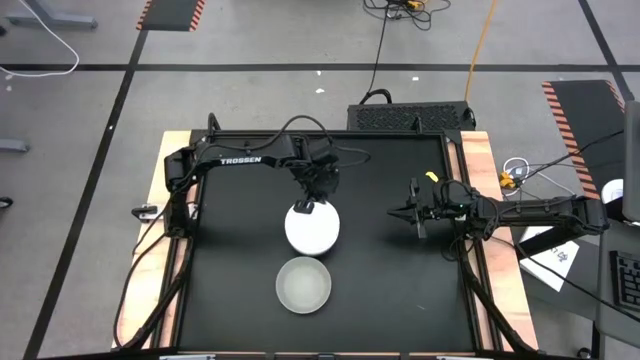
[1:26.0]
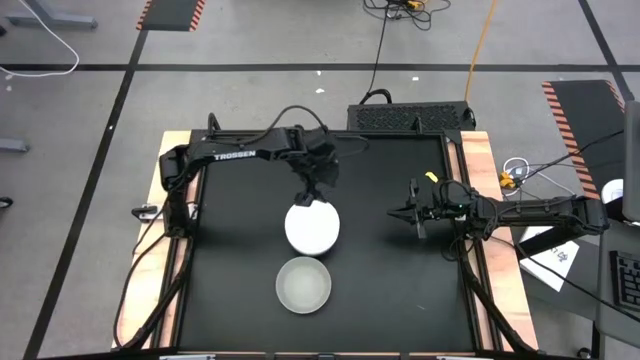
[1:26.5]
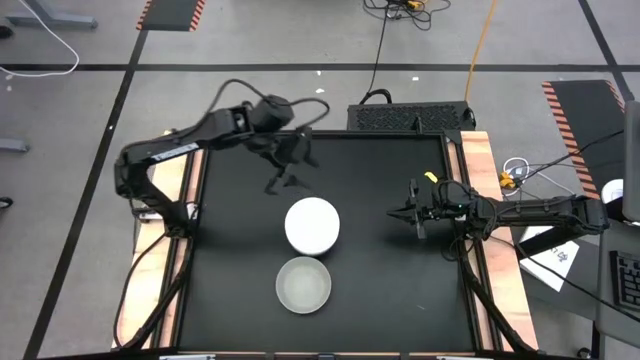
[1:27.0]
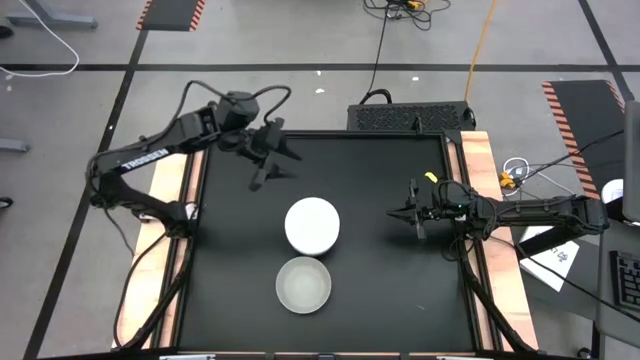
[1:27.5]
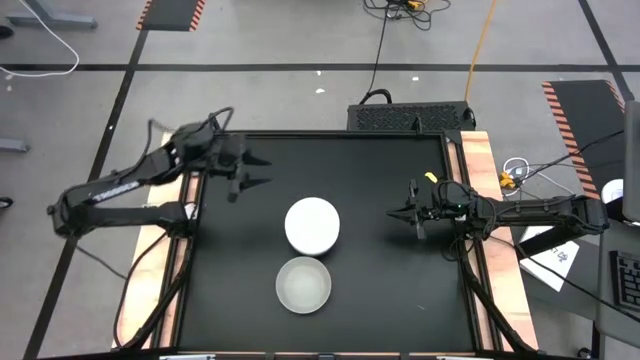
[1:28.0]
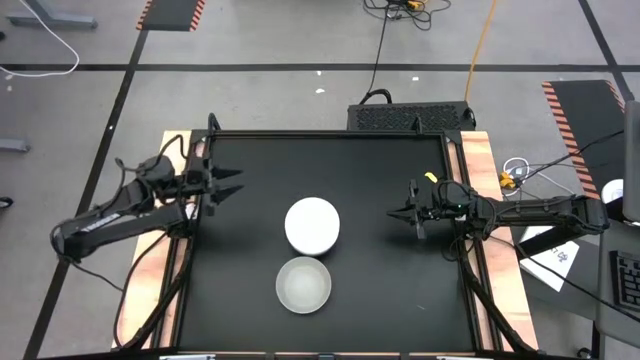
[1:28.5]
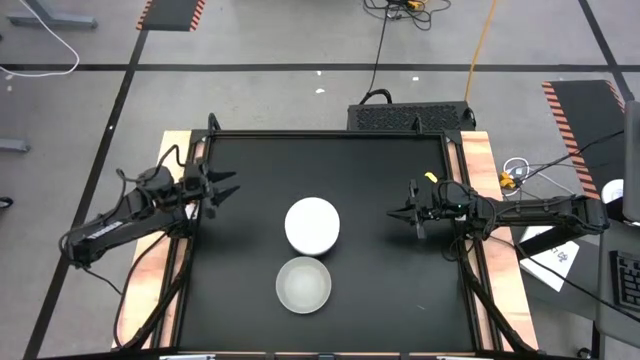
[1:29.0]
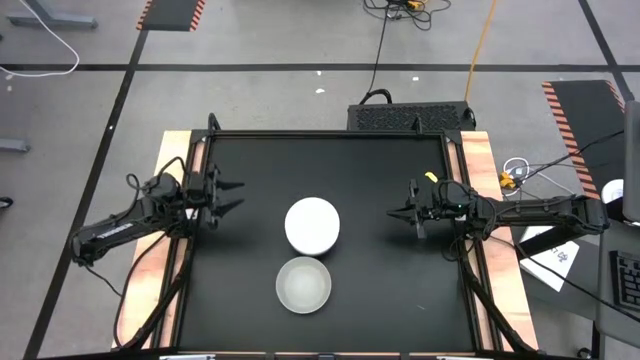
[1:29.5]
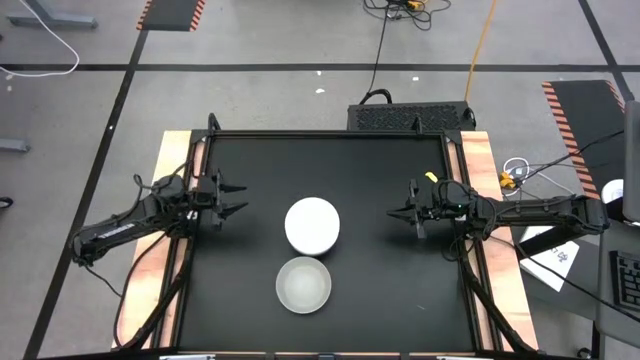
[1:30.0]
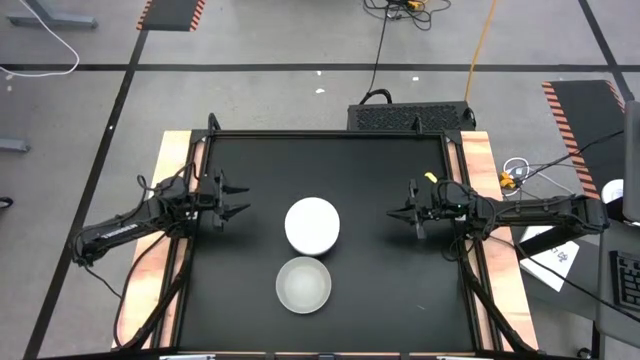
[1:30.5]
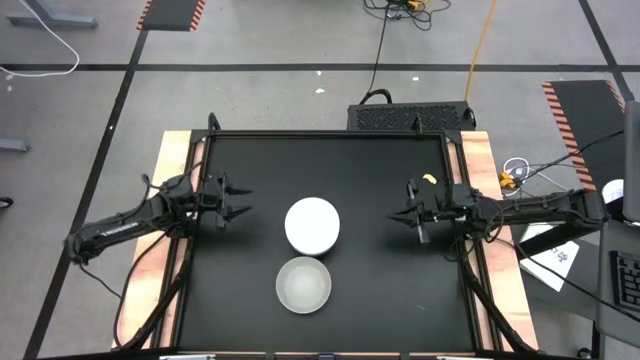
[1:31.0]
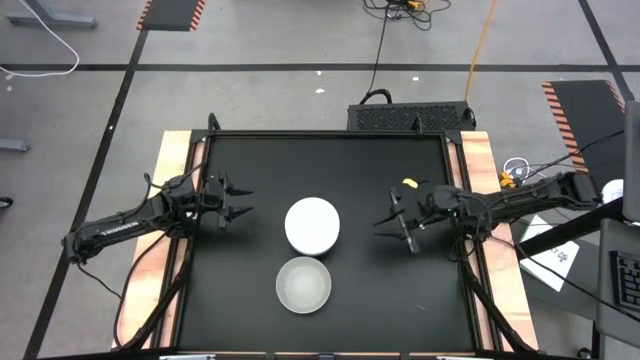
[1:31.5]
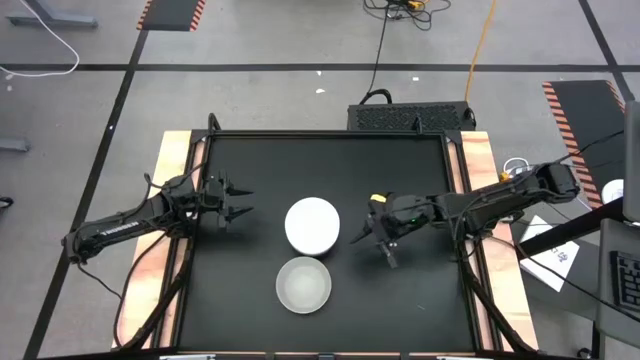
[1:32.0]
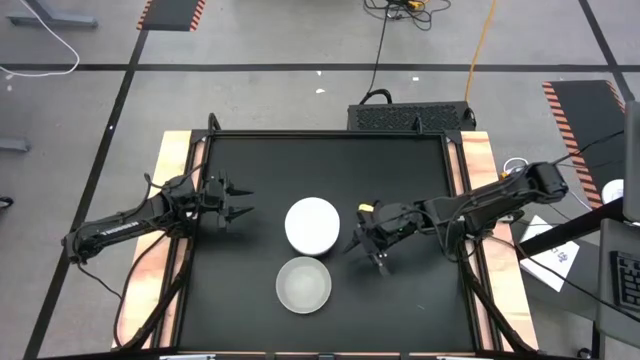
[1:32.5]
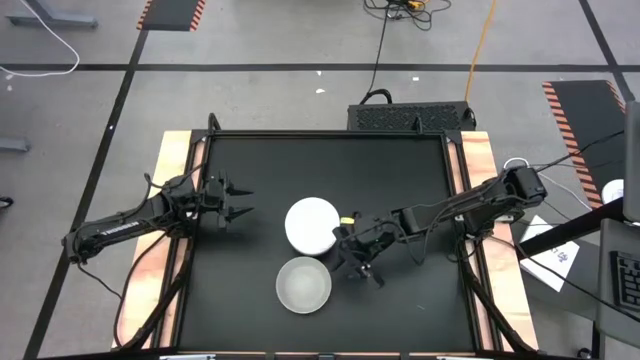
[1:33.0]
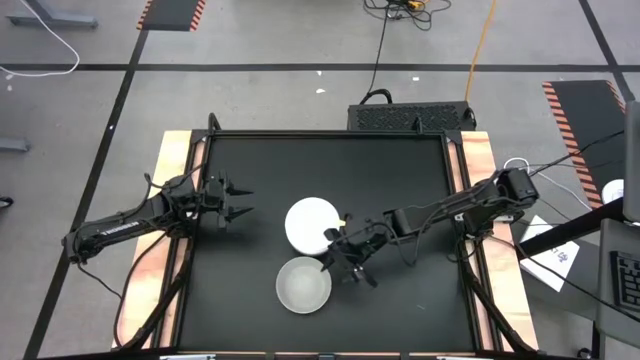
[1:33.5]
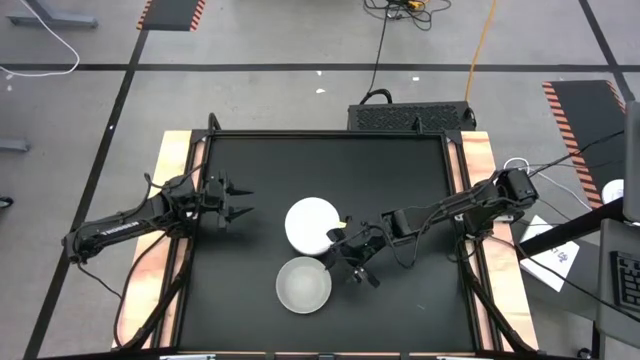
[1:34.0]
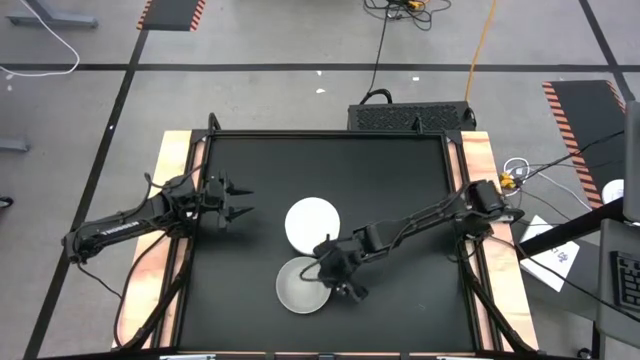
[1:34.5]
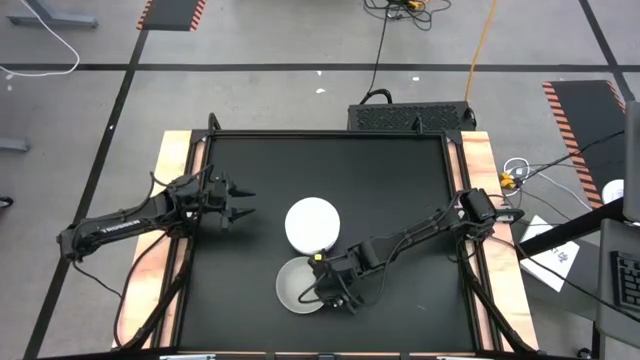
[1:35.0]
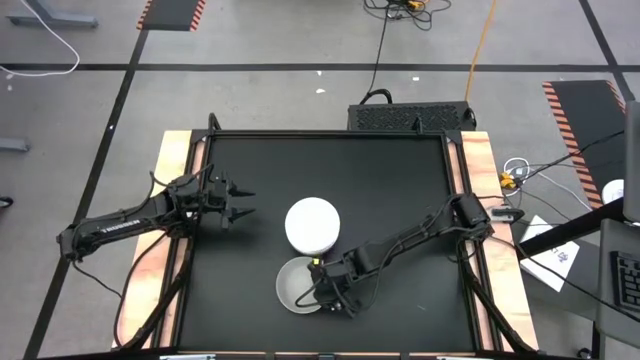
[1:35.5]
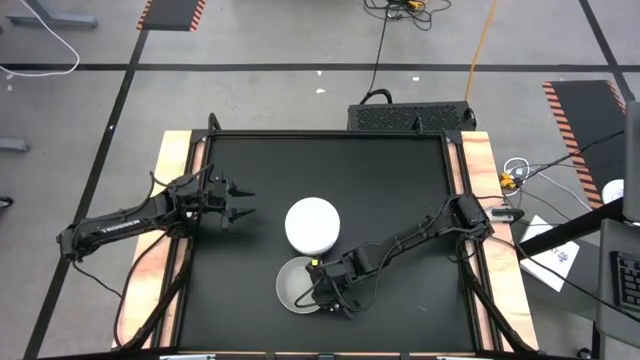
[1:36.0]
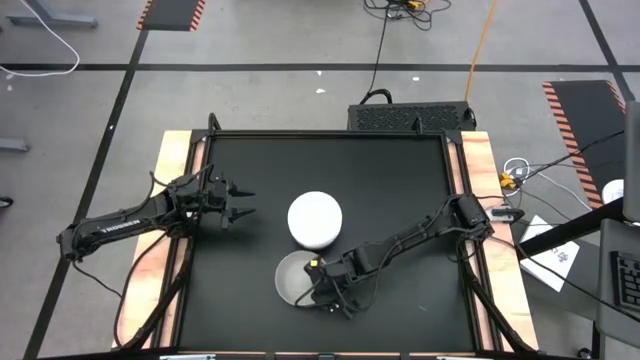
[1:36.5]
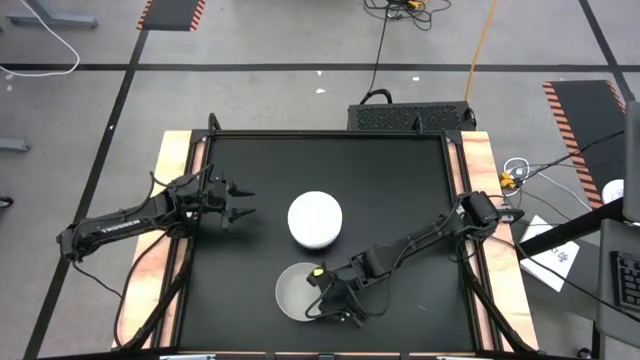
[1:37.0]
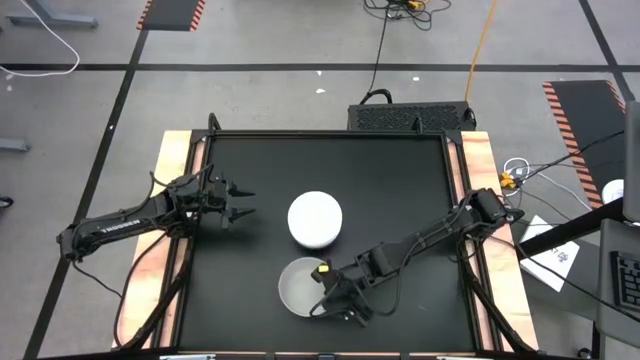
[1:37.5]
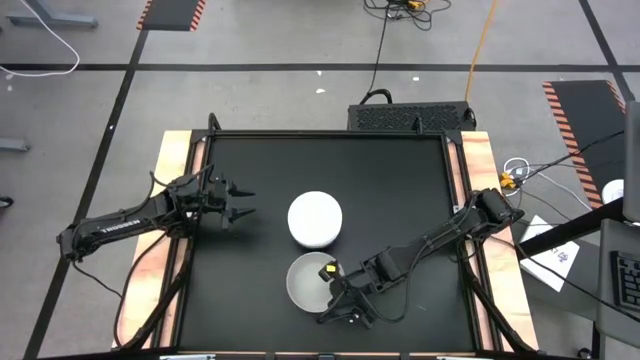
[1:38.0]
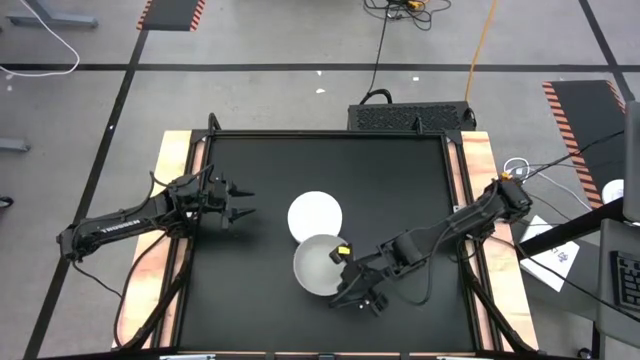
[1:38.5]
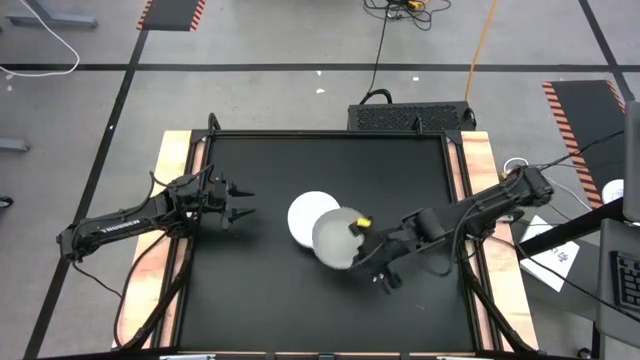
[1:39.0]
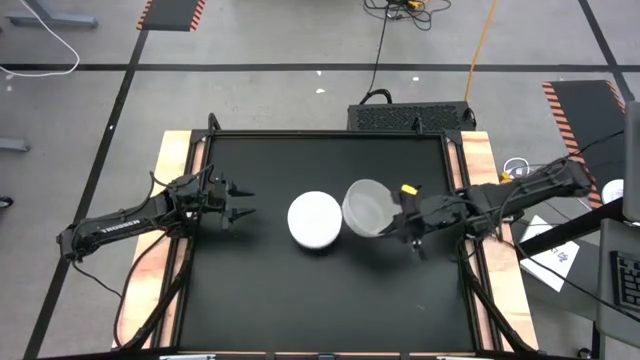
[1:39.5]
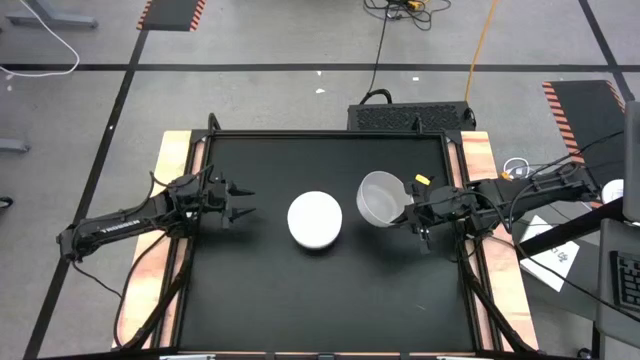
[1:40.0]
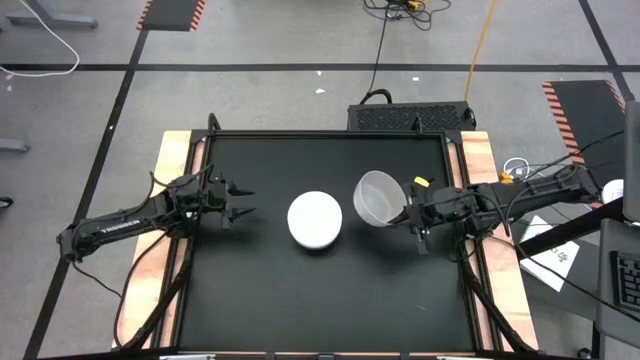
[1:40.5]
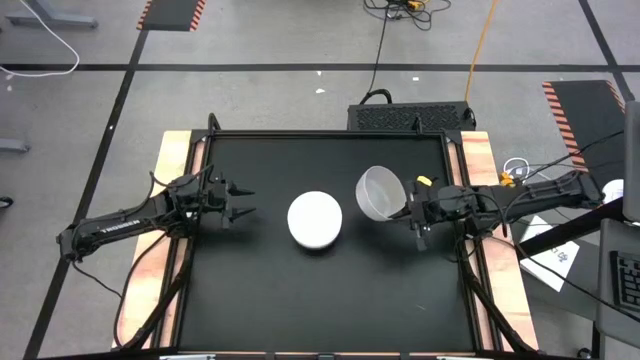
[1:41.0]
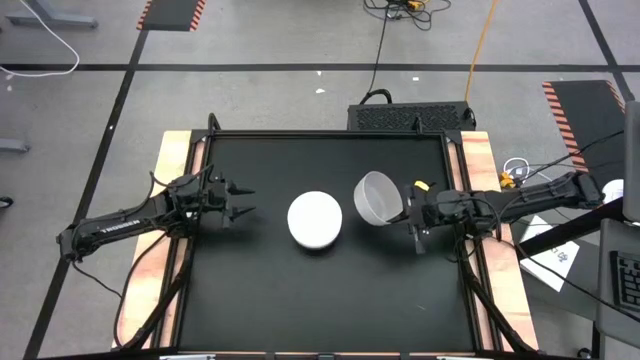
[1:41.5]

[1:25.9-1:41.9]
Task: Nest bowls inside each other
Stack the light gray bowl on the white bowl

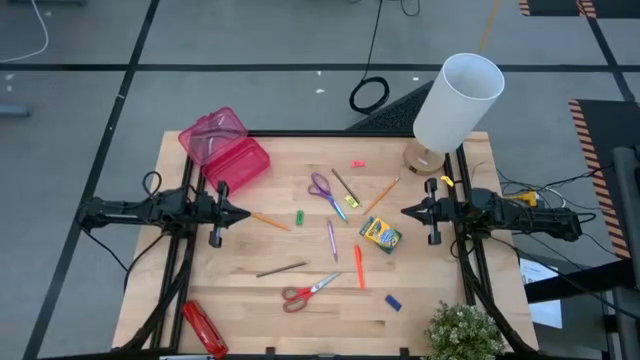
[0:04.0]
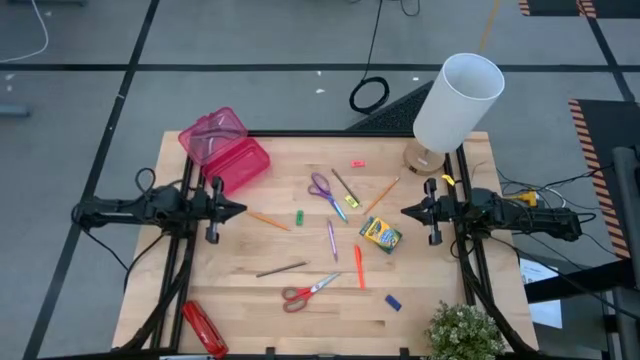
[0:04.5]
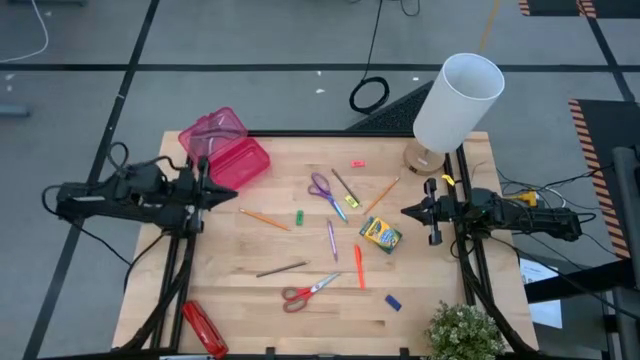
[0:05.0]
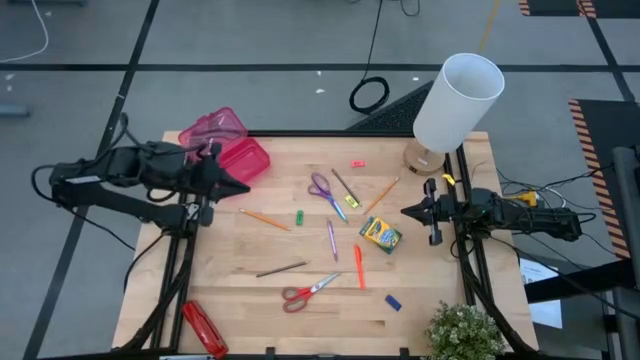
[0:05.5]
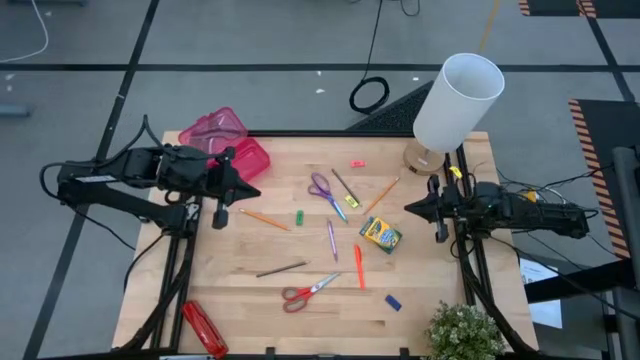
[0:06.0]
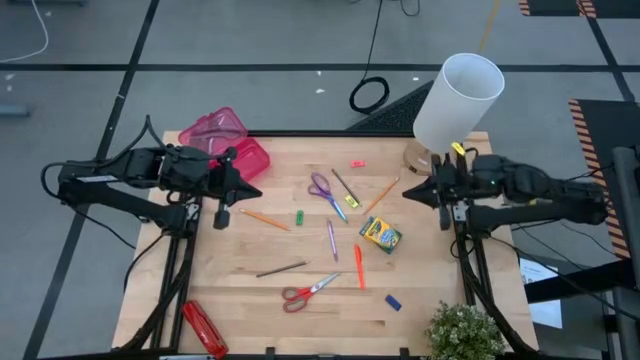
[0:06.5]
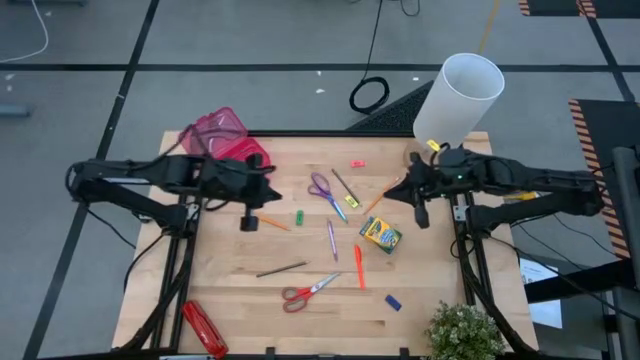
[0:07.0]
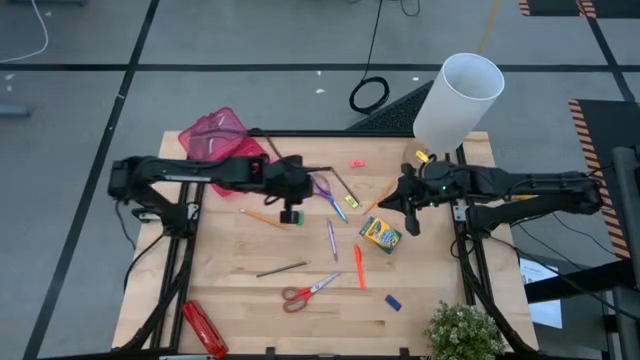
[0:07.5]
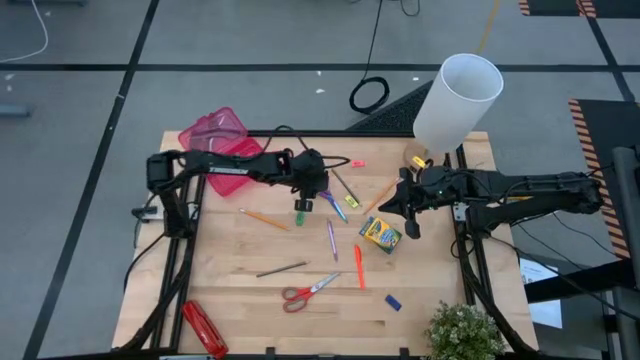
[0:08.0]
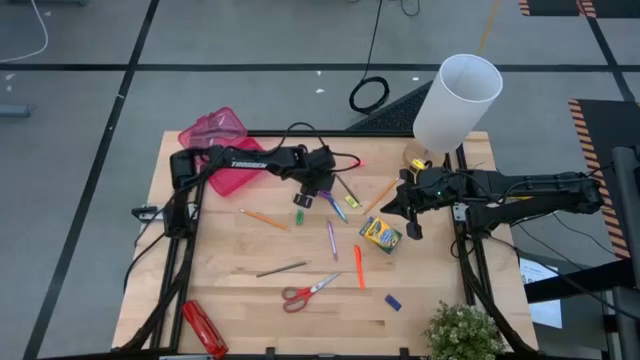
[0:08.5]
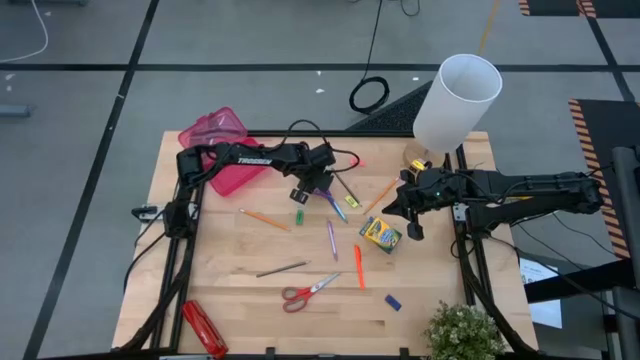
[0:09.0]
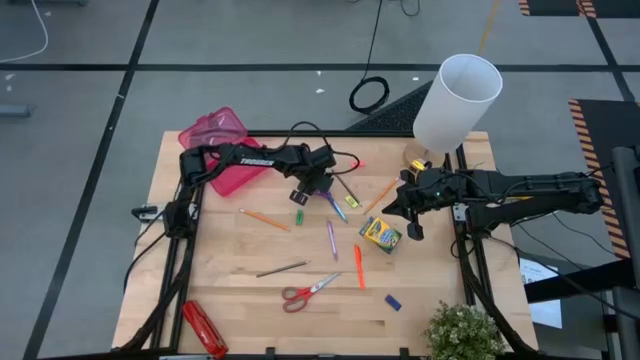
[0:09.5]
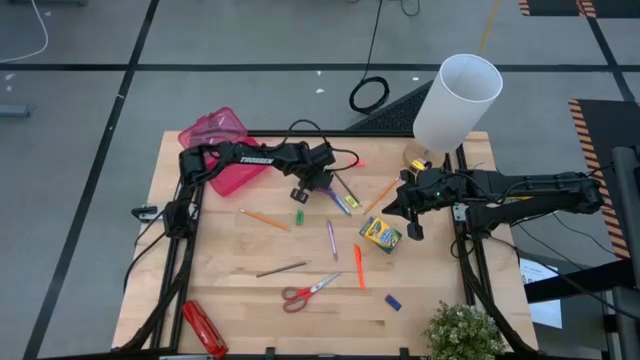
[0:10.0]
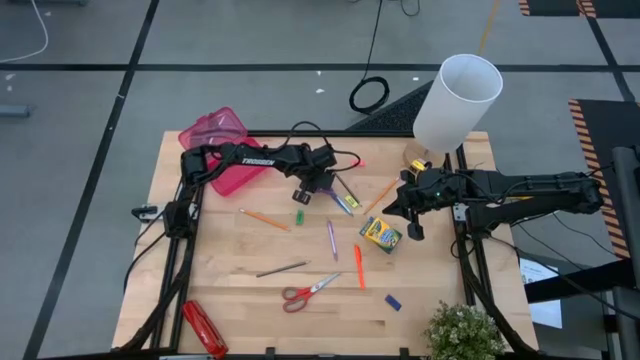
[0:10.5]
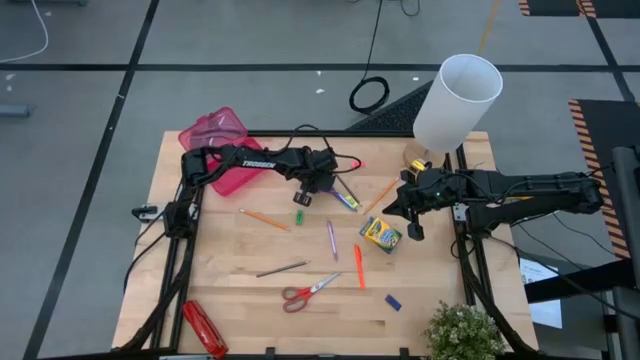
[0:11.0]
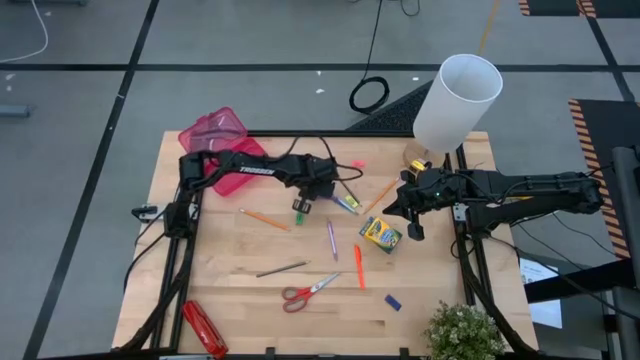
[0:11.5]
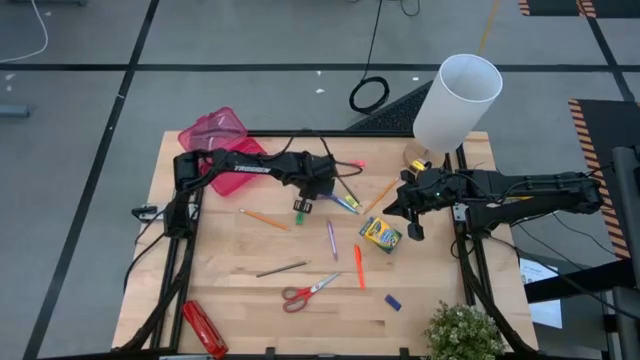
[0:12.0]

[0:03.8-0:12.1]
Task: Pack school essentials
Put the violet scissors into the pink supply box
